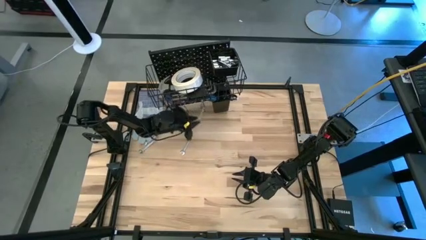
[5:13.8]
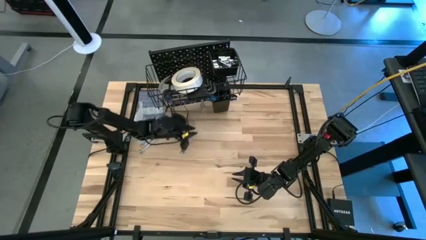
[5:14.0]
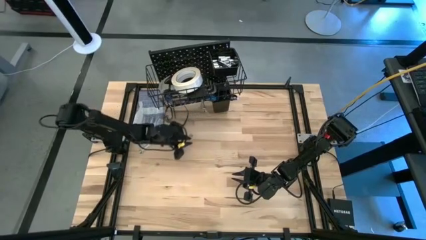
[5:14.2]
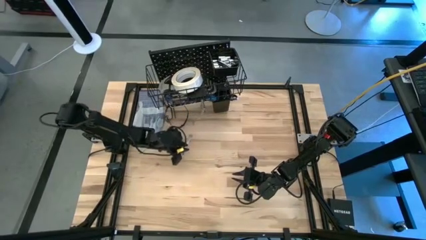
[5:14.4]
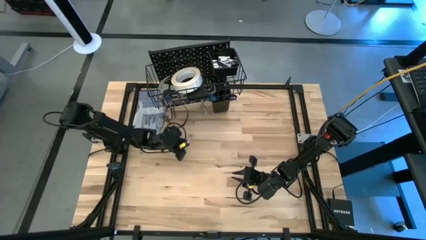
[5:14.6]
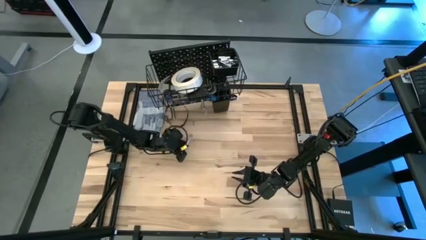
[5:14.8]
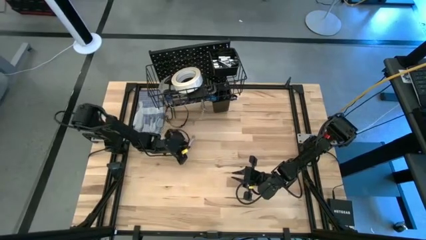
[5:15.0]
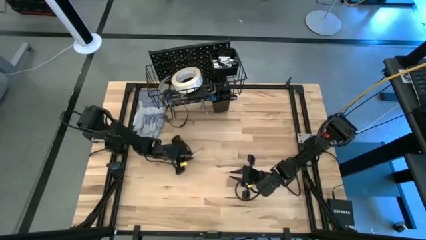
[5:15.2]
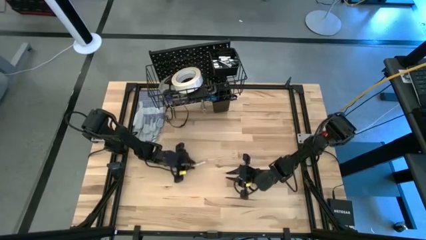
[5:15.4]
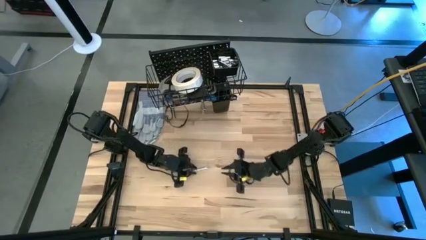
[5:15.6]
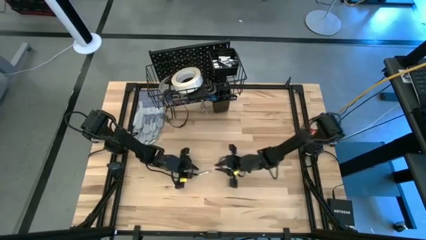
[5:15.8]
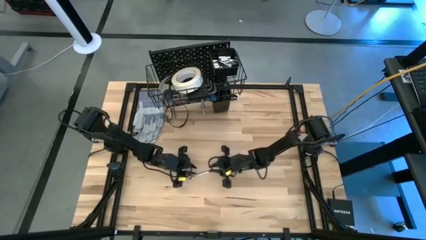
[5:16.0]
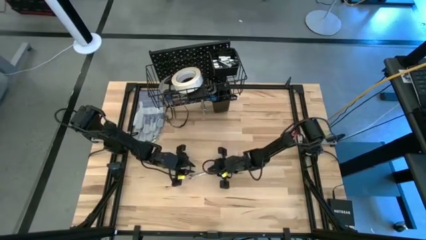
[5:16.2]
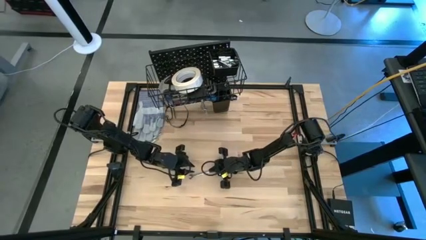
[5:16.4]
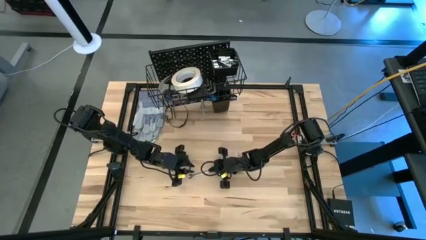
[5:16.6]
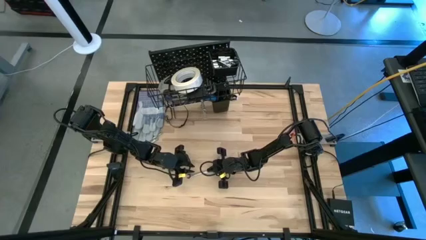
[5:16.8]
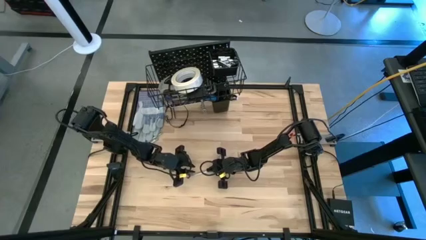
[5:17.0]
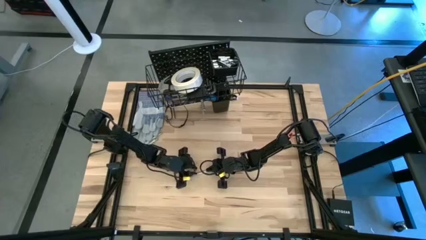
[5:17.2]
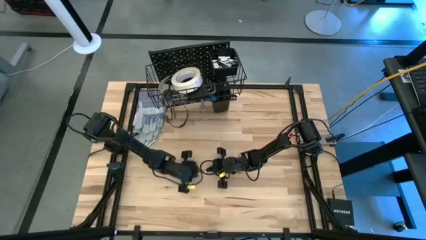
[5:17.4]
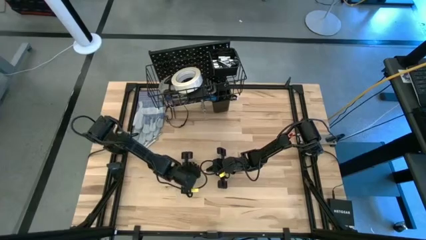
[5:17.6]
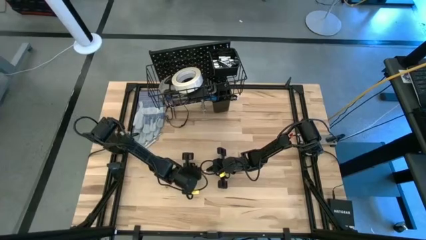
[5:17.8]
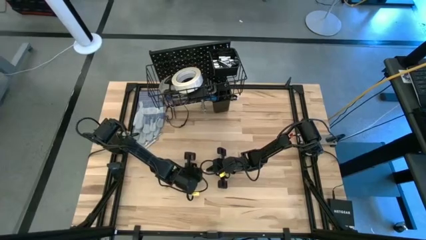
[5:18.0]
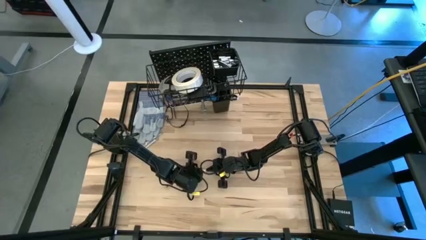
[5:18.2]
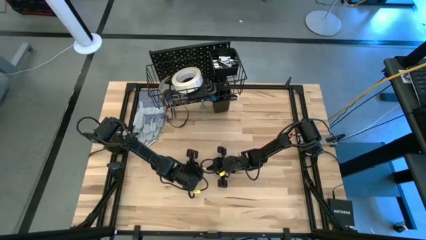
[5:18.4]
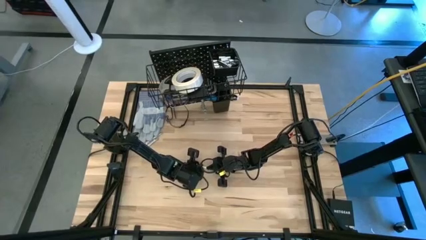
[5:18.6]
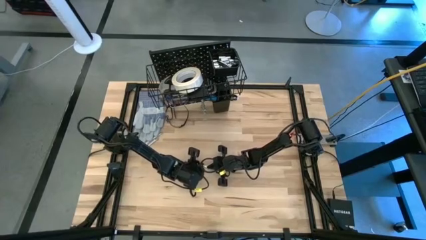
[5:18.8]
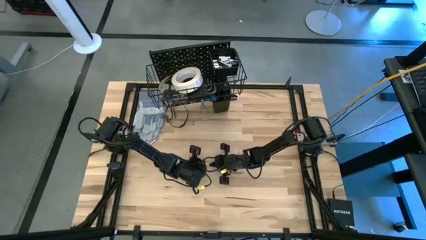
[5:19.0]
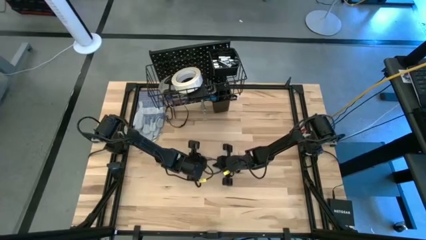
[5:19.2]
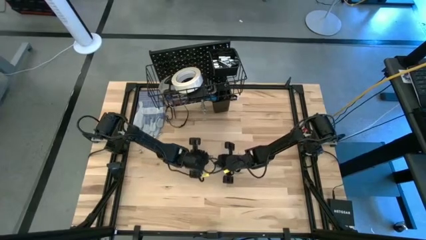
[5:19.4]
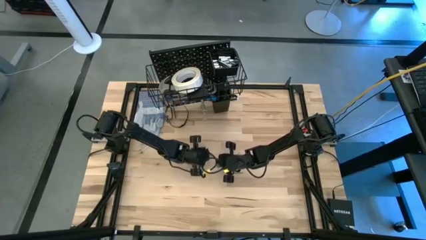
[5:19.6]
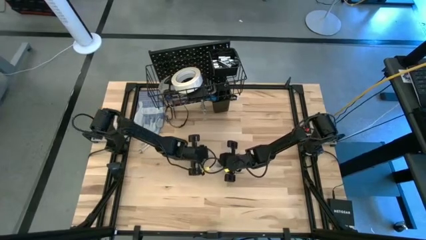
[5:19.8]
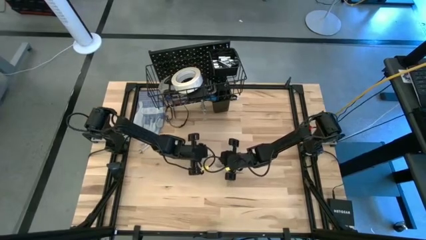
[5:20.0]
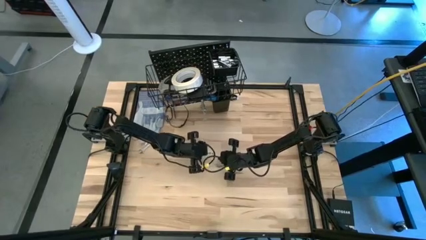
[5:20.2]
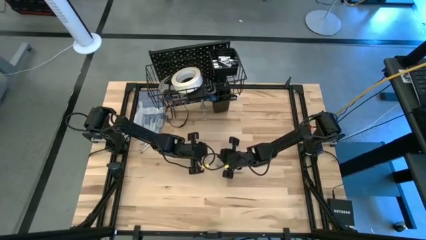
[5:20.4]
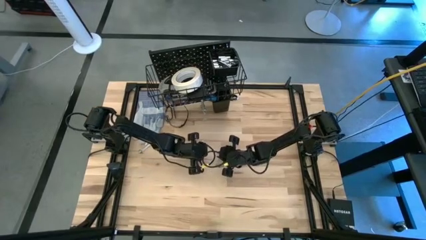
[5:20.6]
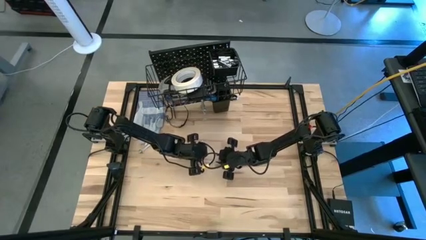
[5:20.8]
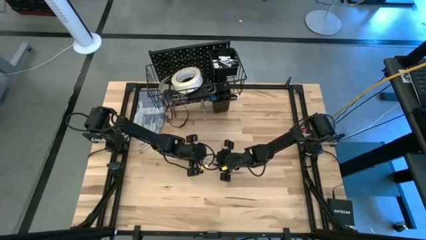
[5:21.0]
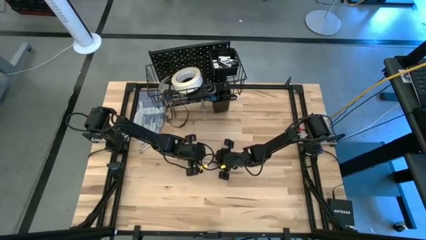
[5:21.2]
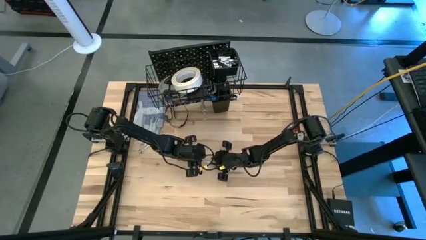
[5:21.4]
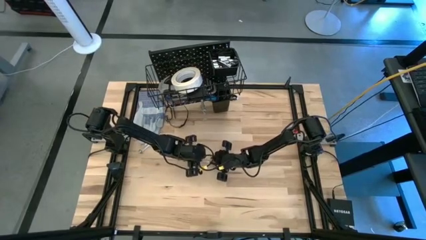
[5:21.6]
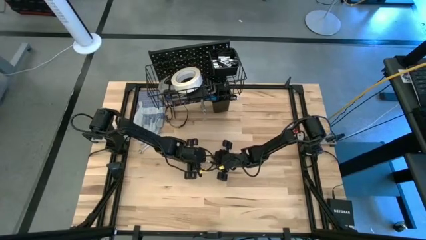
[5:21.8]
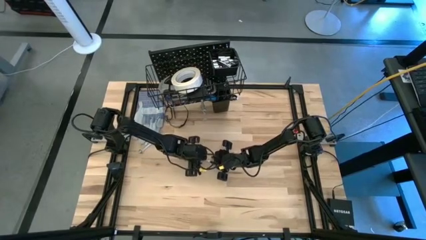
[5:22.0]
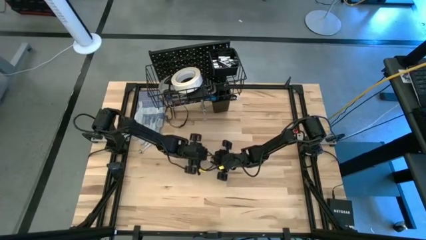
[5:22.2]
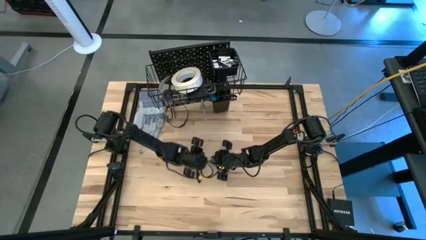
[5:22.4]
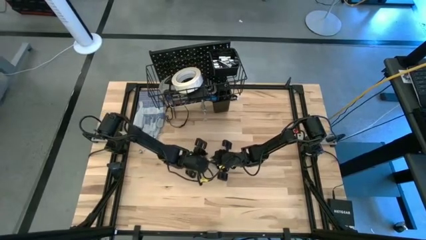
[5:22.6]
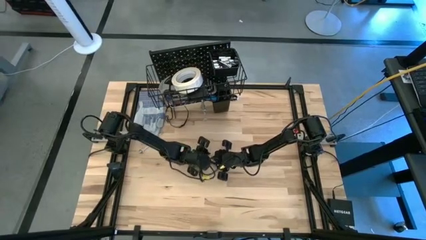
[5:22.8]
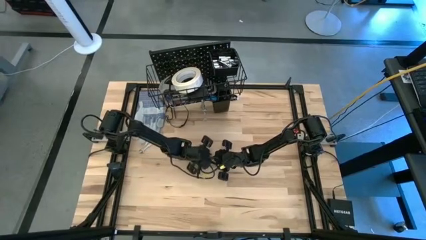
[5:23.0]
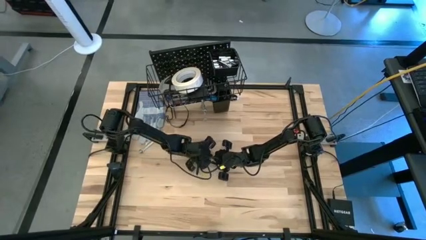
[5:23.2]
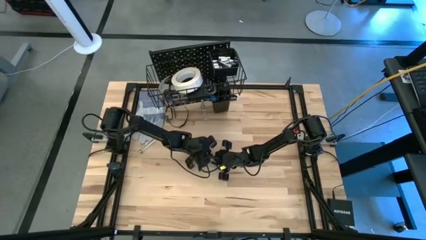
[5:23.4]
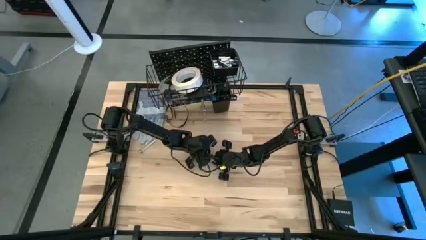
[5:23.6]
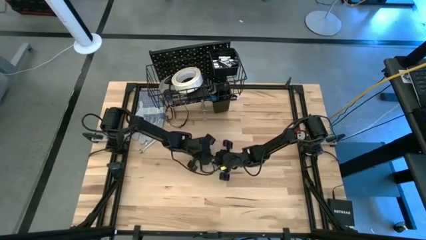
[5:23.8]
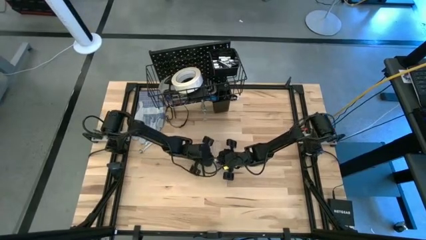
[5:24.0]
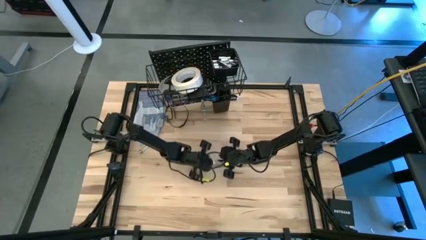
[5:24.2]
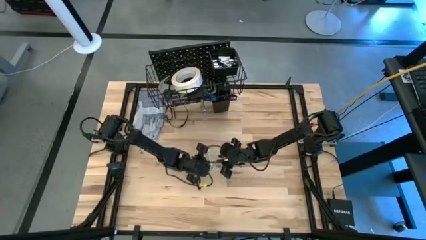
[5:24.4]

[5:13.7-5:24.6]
Task: Hang tools onto peg board
Hang the wrench on the pegboard

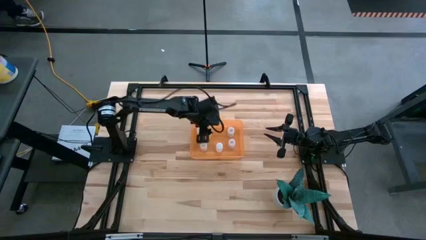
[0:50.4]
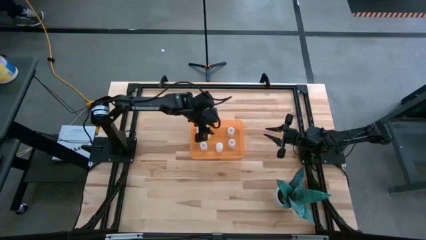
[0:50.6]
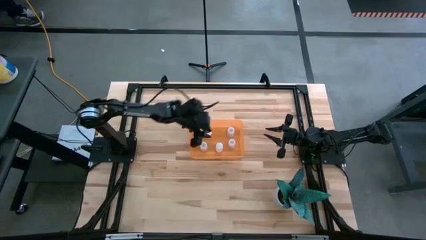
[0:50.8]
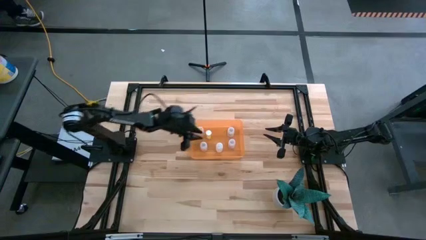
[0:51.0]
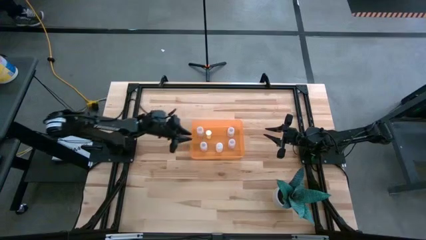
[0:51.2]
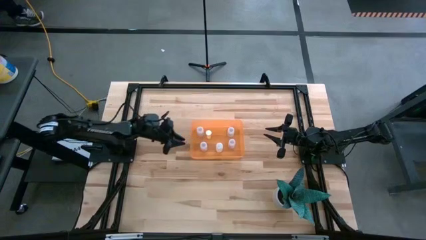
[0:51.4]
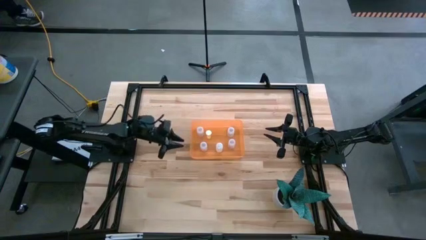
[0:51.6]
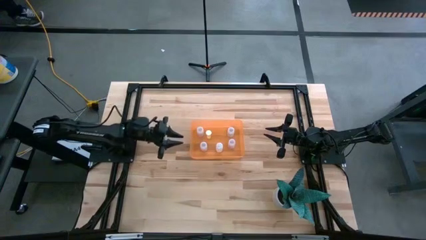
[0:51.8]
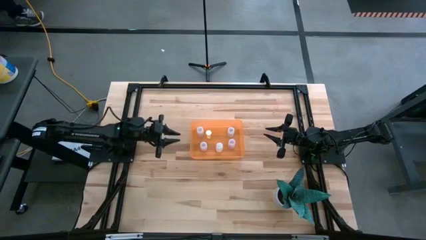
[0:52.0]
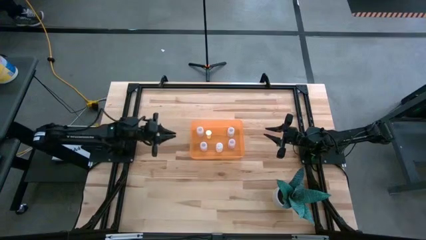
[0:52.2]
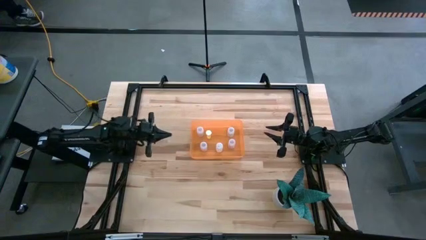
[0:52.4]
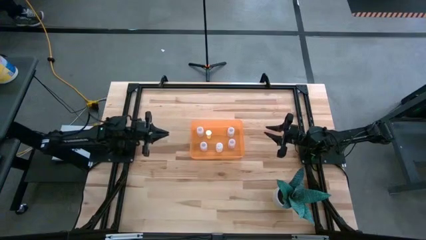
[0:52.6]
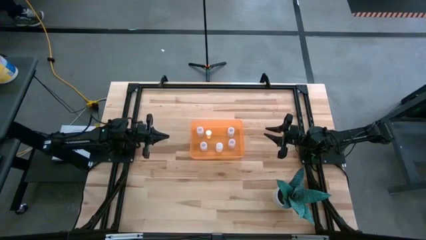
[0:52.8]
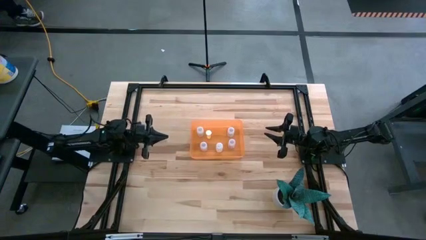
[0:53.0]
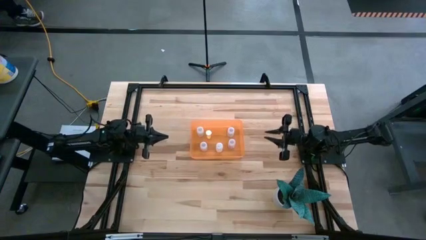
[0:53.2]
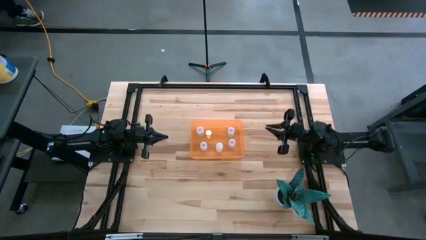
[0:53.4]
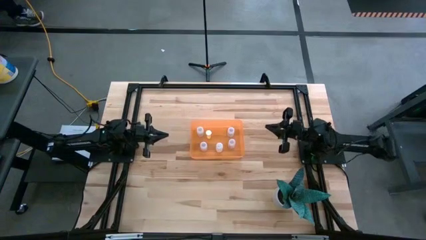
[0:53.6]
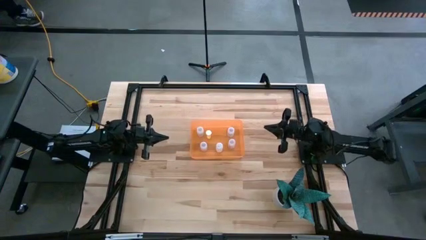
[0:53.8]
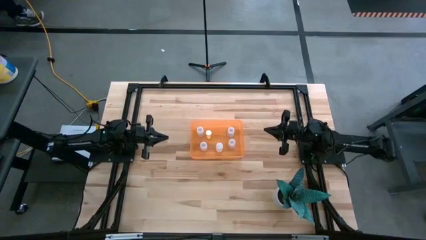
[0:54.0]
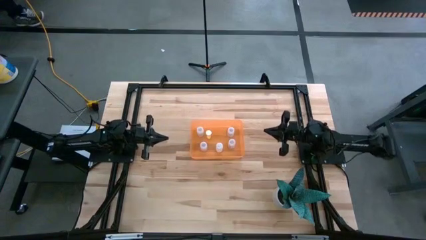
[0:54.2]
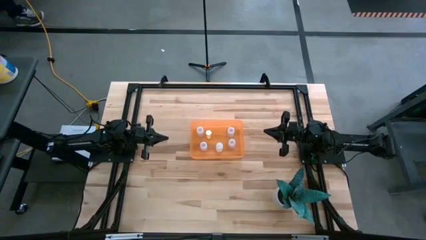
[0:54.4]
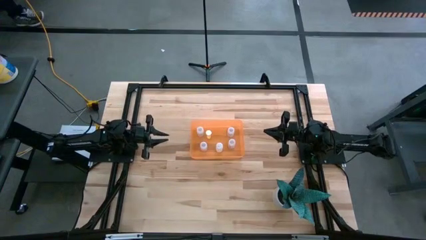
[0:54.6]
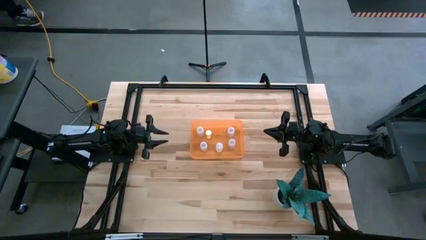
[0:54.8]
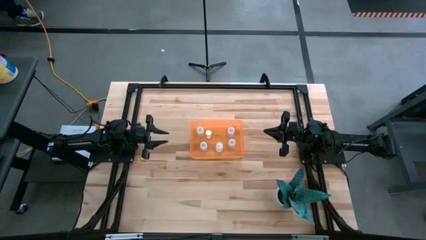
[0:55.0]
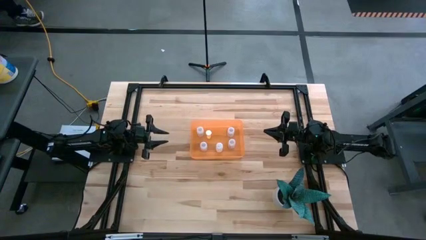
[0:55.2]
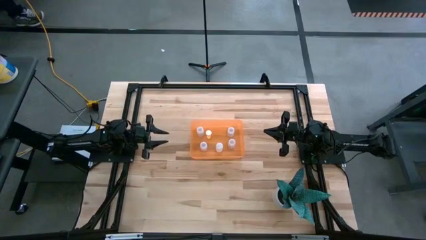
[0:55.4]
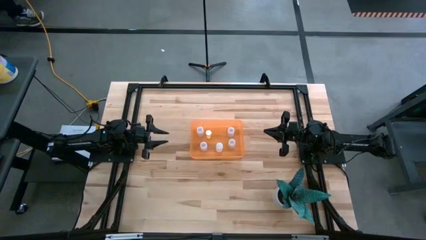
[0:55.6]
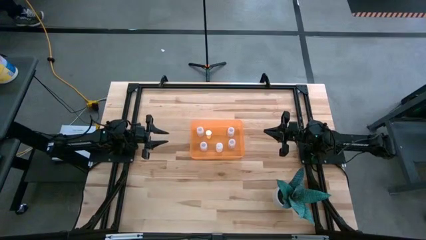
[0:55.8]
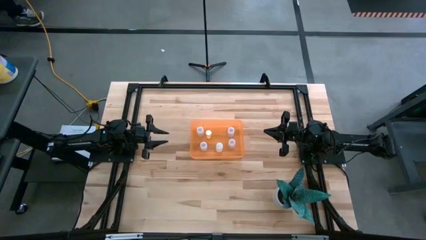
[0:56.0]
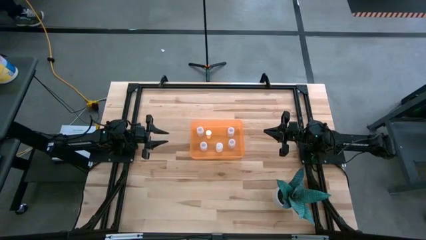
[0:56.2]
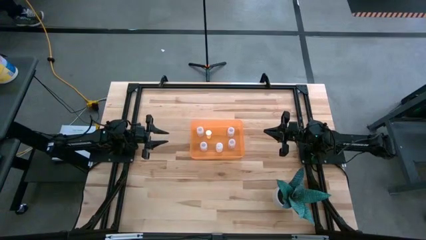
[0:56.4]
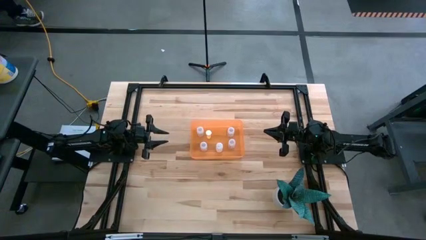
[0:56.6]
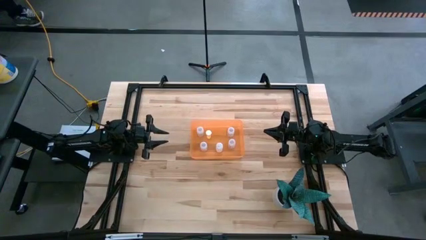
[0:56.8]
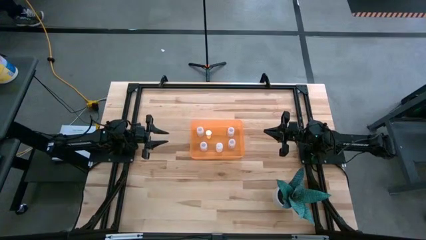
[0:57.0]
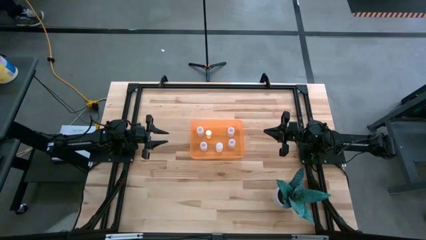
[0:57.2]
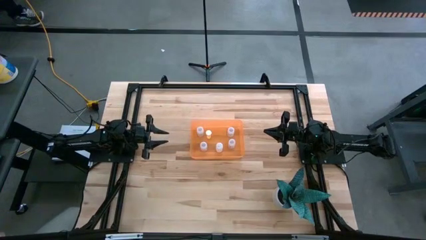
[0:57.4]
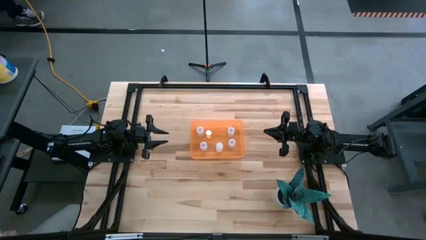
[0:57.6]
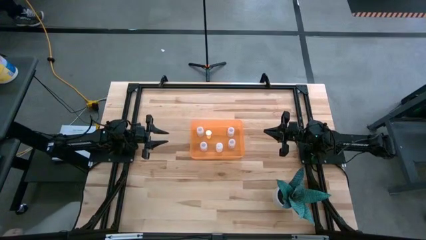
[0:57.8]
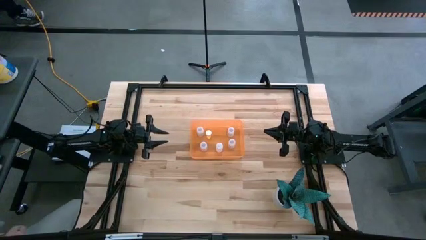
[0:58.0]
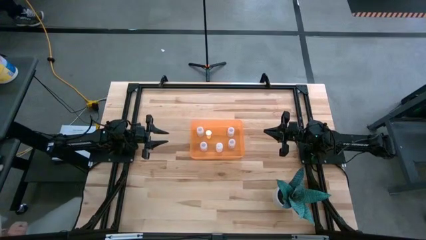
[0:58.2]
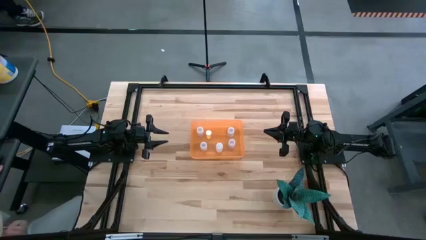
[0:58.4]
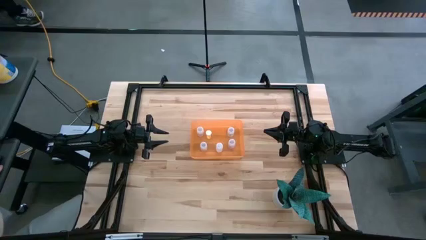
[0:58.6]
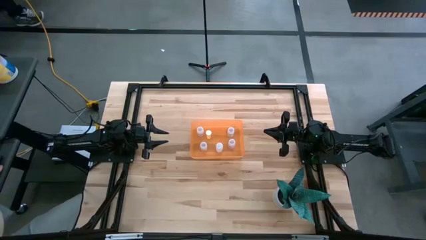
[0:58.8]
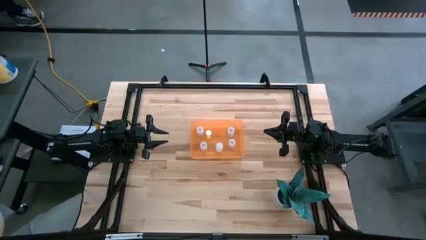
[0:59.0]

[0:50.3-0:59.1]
Task: Pick and place pill bottles into a basket
Return to Home Position
